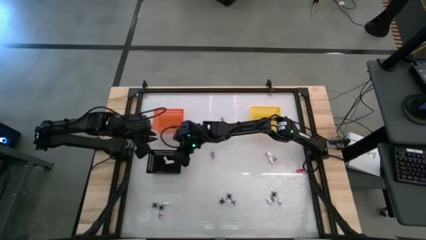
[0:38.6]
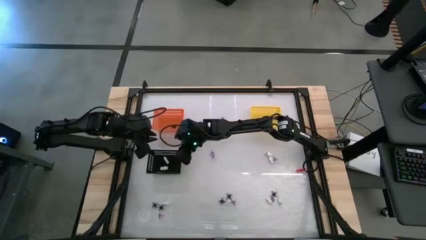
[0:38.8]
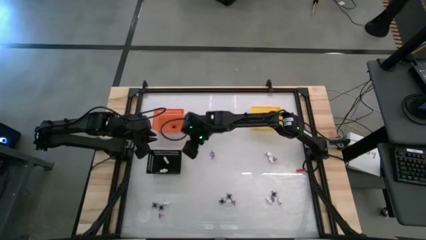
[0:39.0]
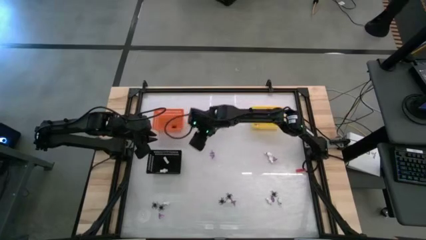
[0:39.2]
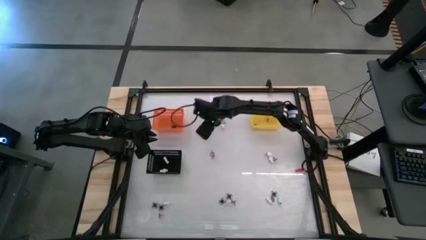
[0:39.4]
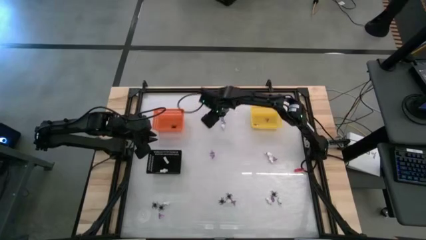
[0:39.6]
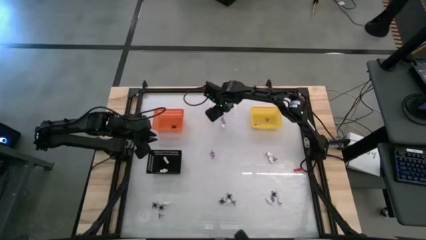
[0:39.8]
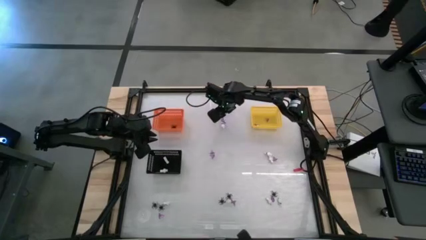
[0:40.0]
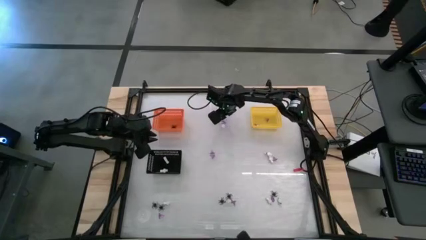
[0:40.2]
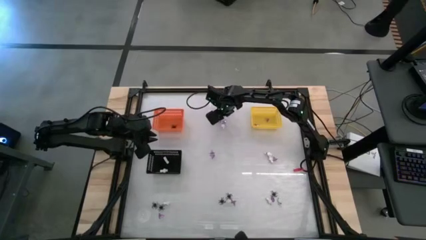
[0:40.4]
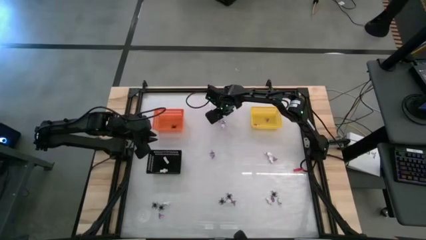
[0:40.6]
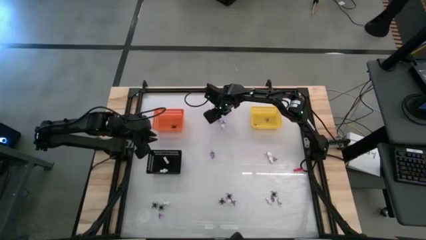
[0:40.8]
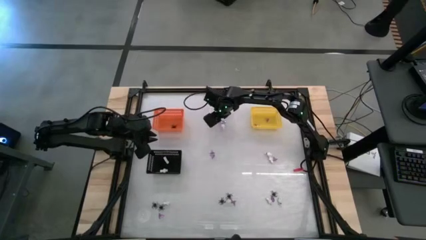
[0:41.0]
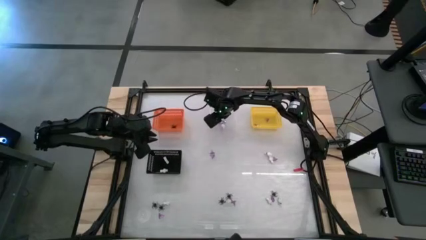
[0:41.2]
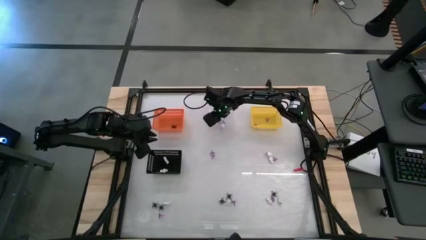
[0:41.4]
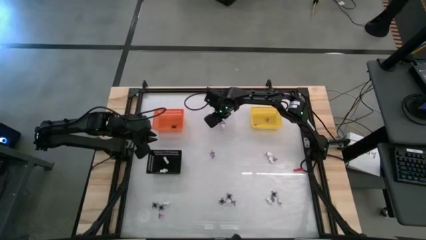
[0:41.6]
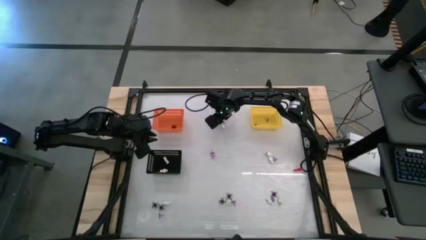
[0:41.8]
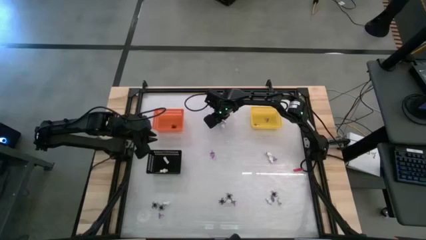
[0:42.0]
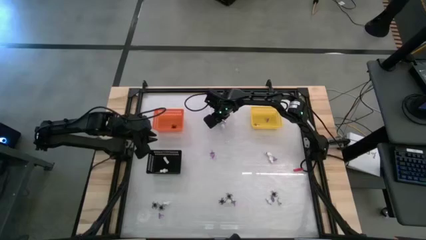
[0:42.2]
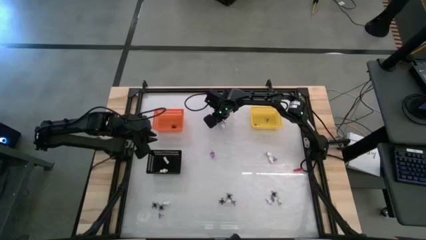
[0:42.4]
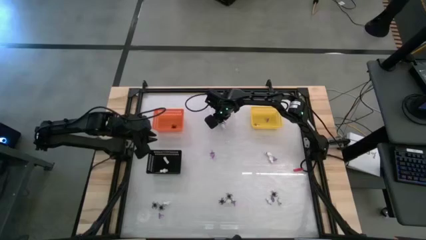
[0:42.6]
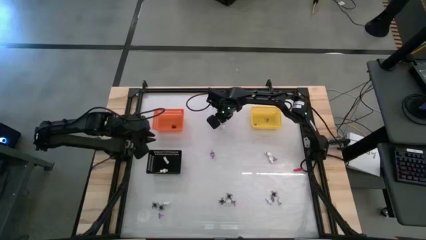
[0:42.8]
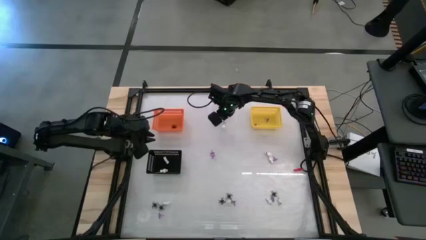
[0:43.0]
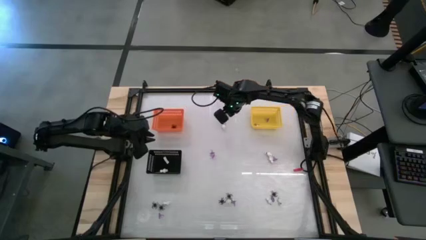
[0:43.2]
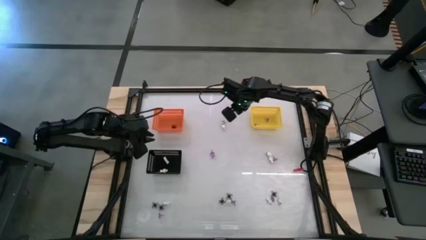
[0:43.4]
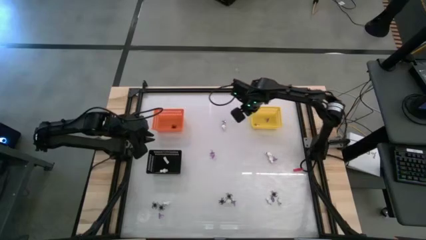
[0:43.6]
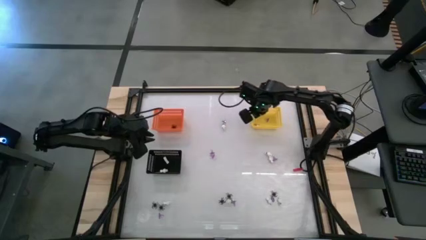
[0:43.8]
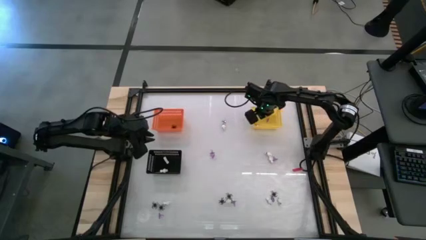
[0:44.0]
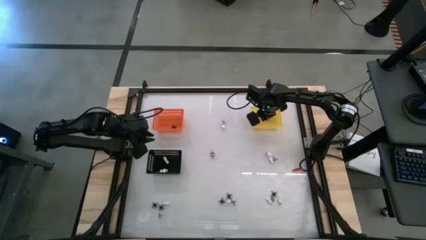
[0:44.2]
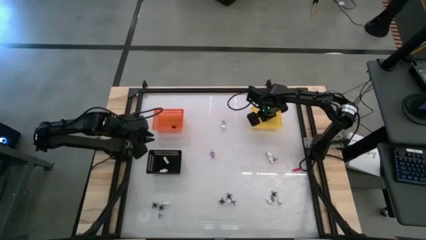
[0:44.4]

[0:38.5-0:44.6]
Task: Sort Halloween decoration
Put the violet witch hat into the yellow bin

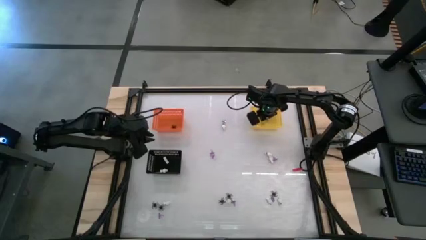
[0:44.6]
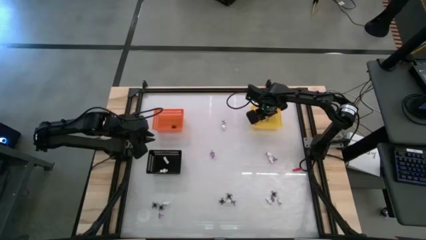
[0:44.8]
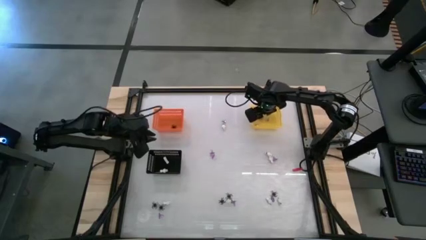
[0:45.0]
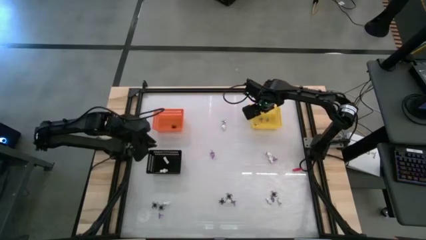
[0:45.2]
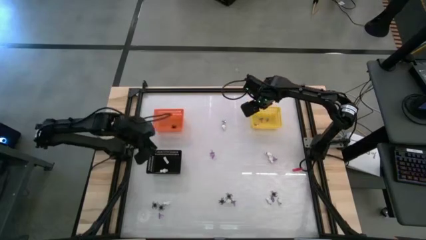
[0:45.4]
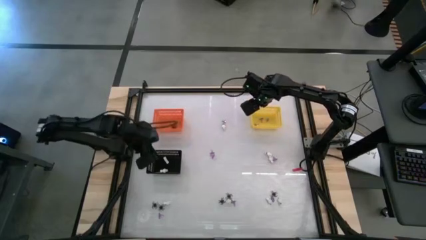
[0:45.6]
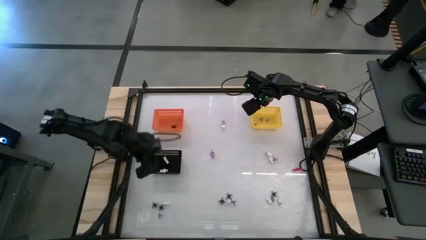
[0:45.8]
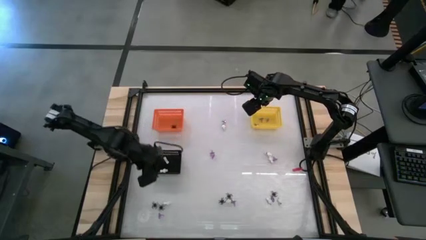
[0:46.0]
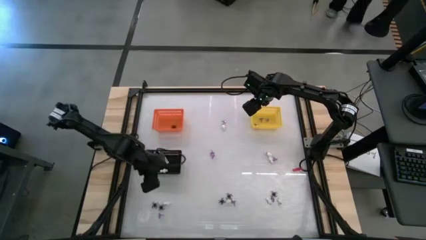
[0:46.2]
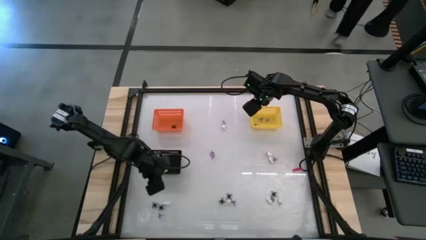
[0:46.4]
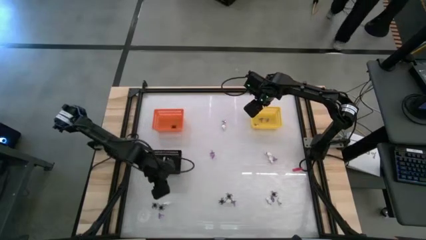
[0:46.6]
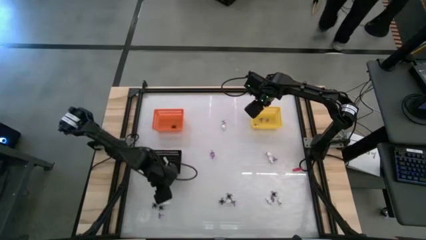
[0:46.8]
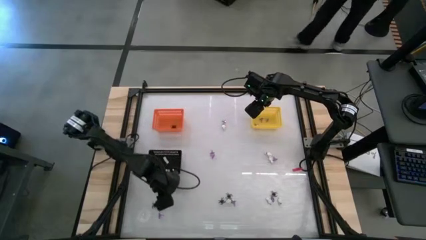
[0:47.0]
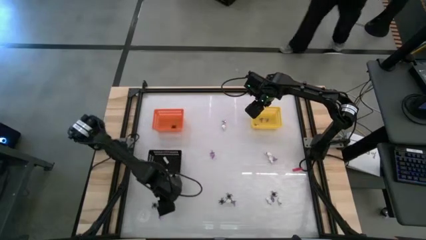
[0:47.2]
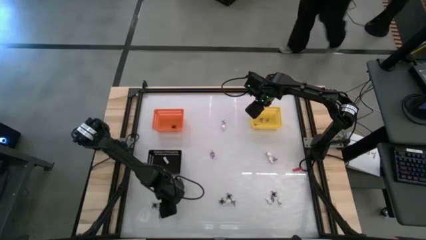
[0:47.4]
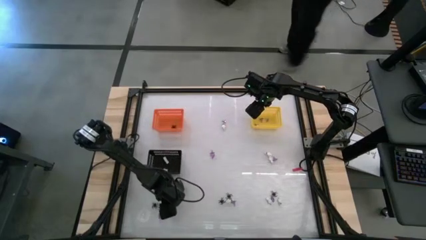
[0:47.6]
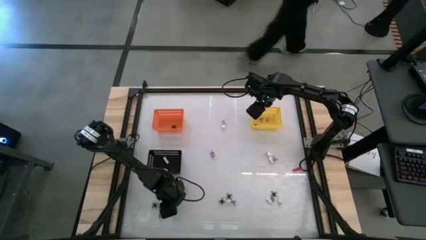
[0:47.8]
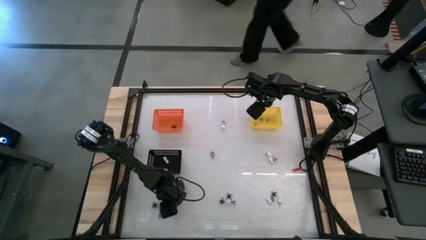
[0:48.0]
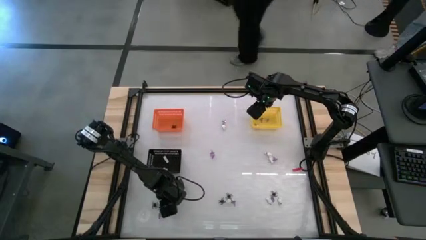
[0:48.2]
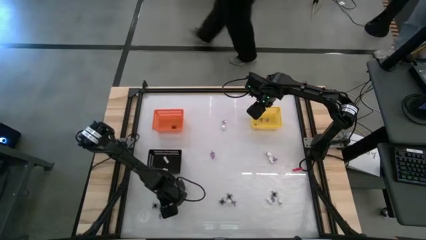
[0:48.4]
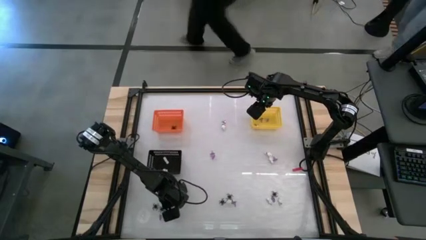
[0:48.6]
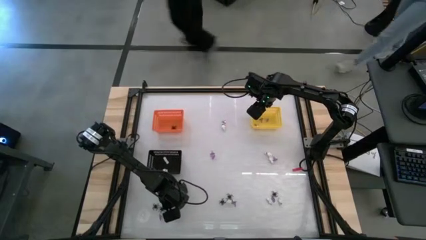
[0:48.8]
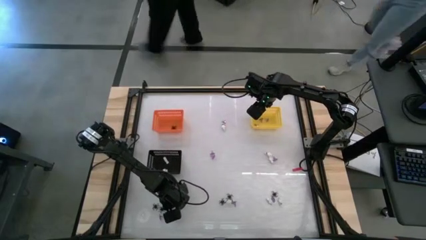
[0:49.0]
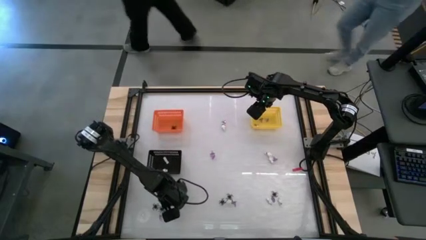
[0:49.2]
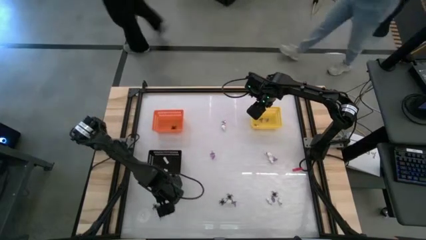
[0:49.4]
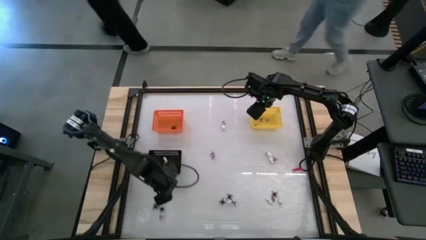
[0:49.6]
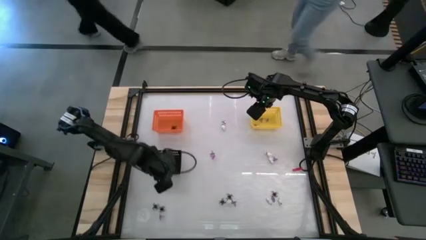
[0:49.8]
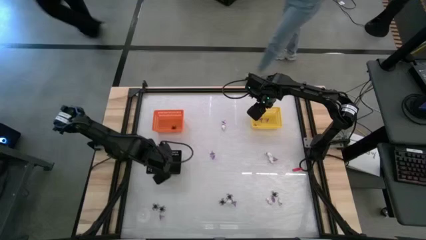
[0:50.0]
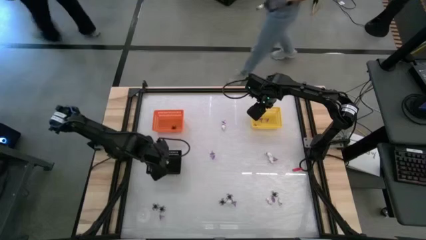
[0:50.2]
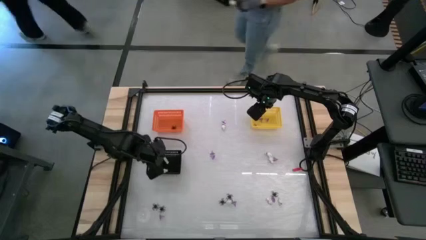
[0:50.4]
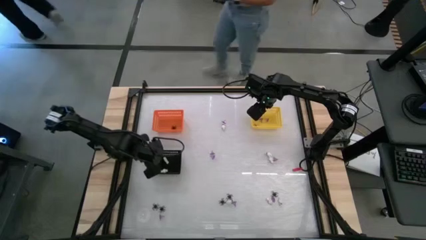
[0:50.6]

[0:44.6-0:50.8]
Put the white skeleton toy into the black bin

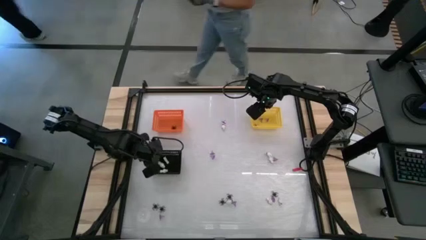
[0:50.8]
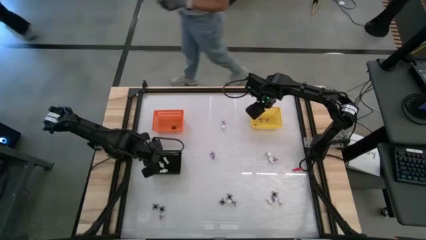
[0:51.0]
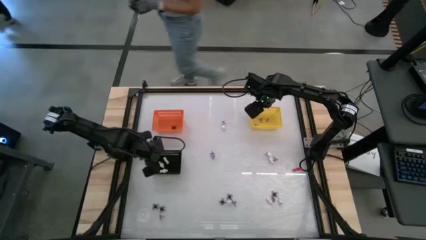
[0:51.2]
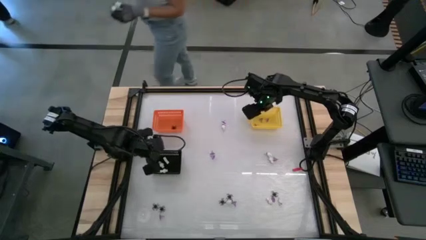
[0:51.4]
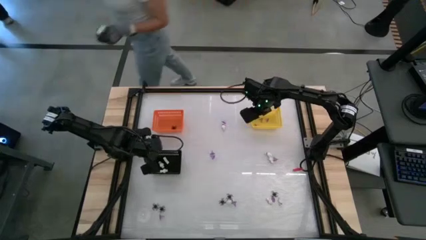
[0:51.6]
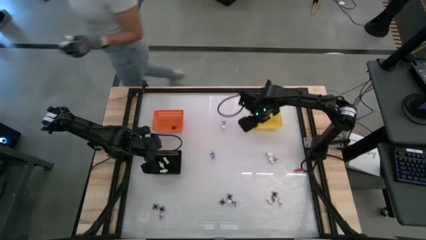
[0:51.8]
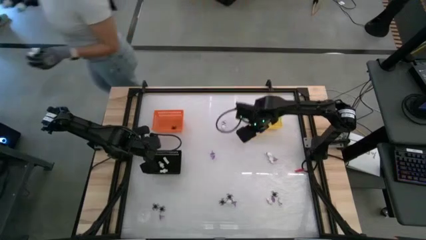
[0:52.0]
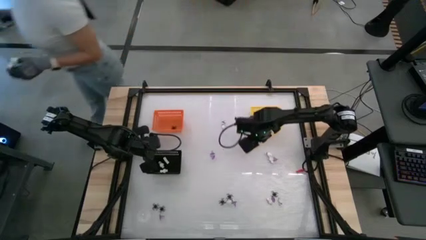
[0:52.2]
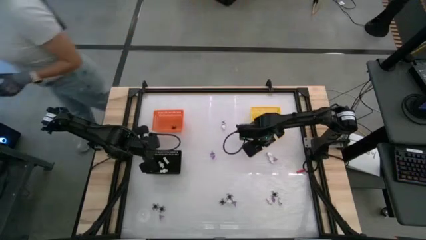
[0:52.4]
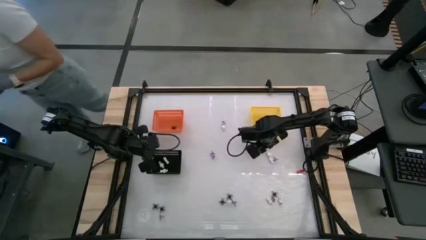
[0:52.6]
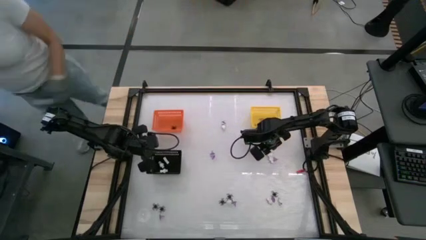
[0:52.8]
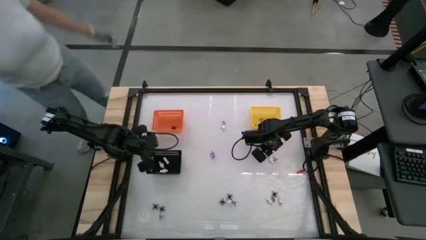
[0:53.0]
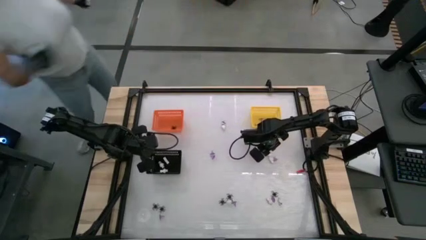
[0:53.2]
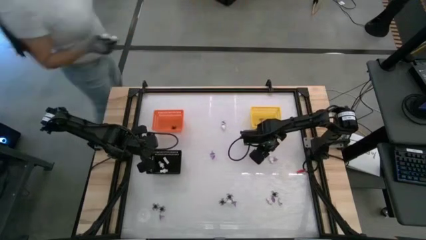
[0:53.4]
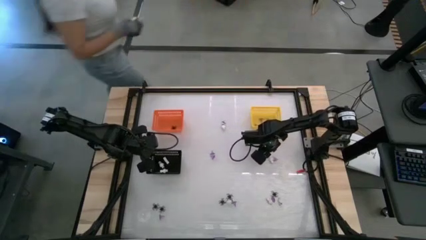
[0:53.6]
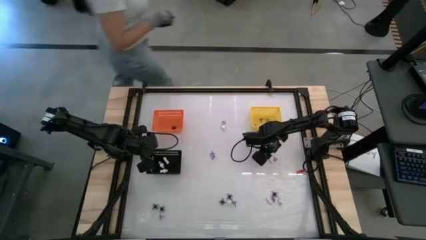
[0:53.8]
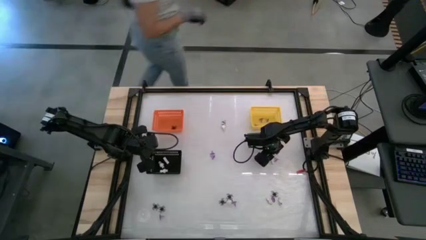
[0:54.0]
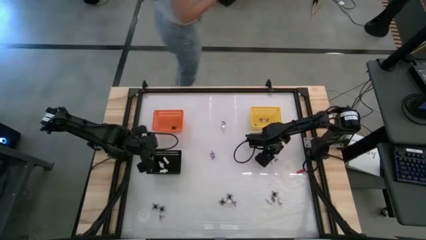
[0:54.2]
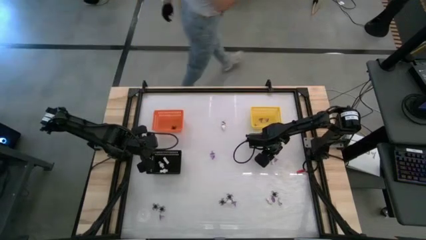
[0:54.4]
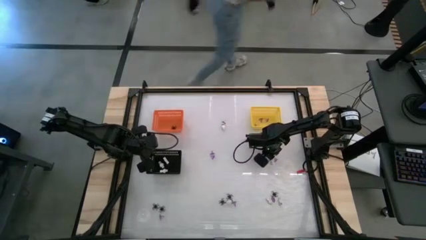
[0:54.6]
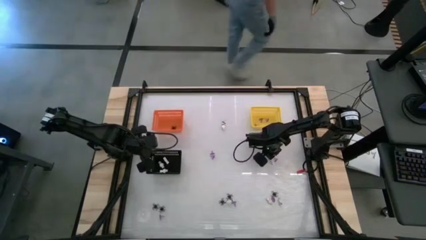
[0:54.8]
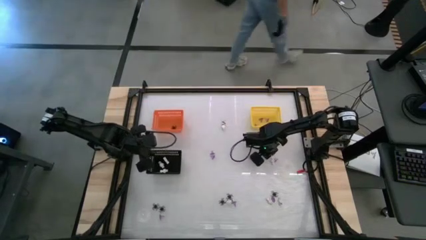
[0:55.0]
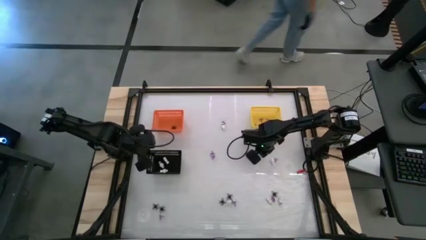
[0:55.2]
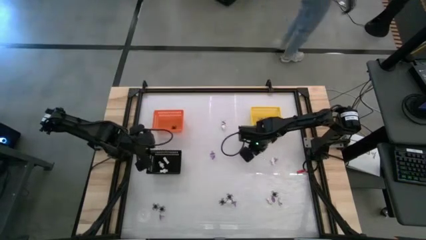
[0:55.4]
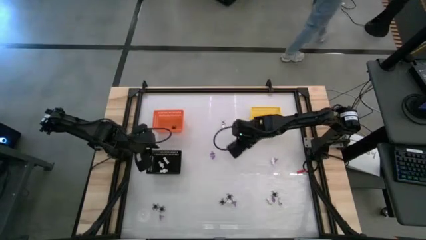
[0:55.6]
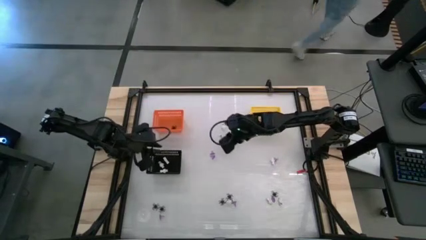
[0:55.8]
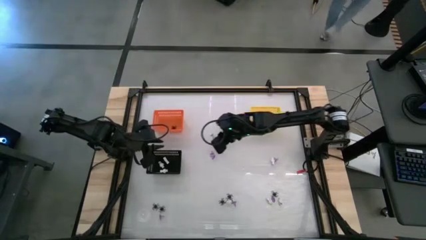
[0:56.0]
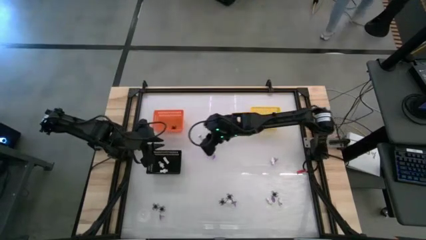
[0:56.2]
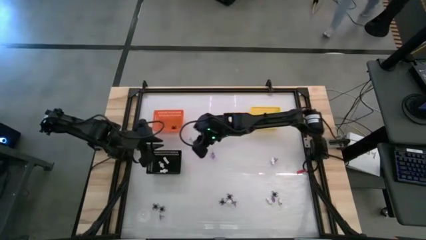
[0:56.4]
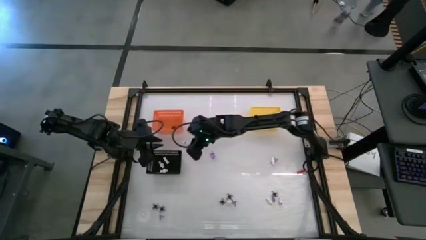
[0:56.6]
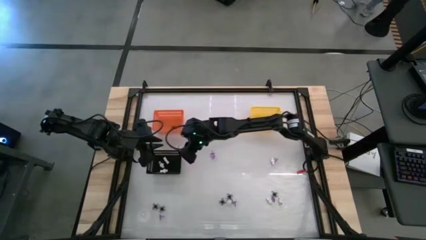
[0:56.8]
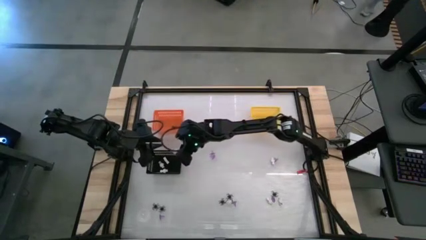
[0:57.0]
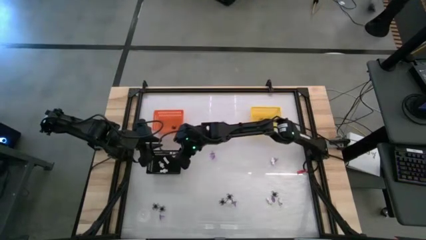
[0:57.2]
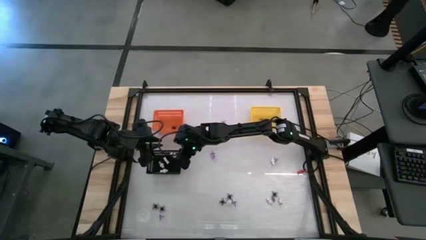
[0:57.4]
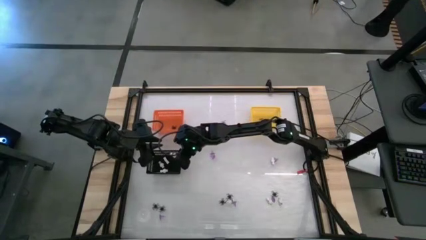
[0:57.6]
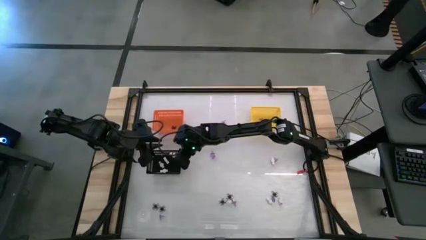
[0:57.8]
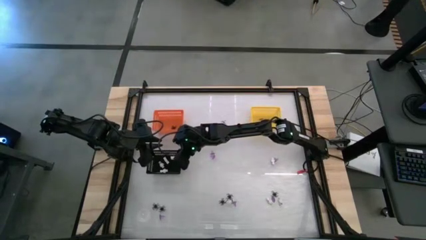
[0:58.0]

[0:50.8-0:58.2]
Put the white skeleton toy into the black bin
